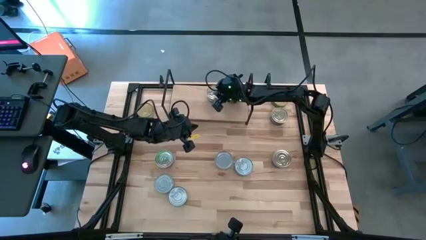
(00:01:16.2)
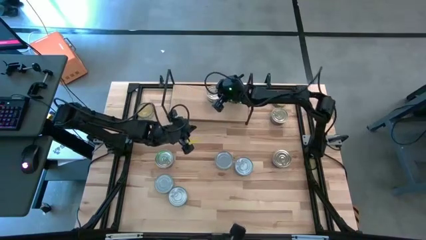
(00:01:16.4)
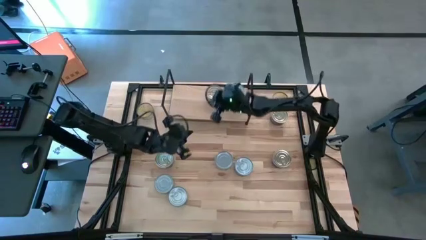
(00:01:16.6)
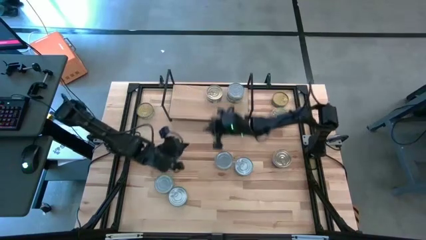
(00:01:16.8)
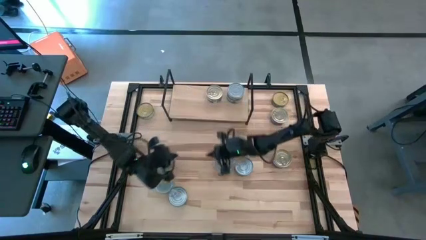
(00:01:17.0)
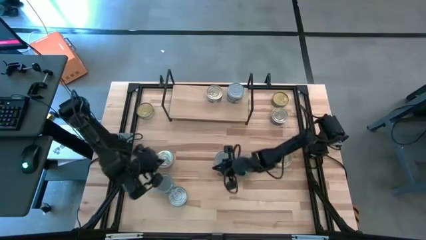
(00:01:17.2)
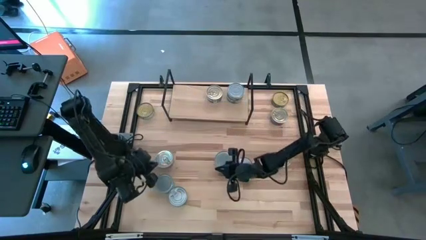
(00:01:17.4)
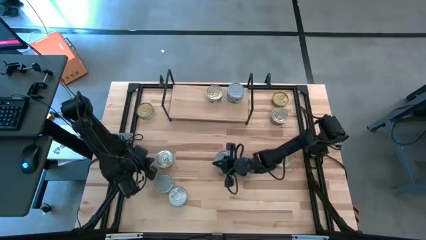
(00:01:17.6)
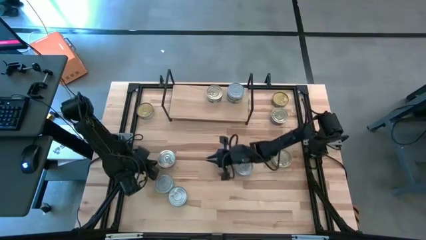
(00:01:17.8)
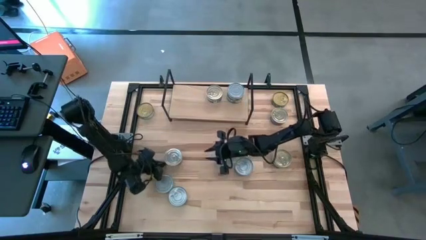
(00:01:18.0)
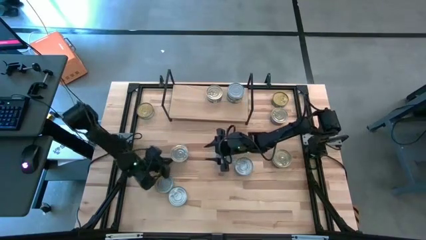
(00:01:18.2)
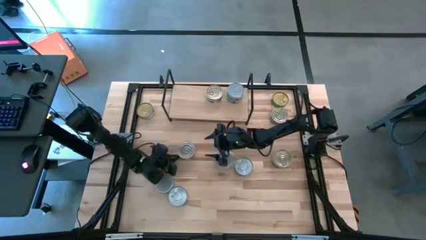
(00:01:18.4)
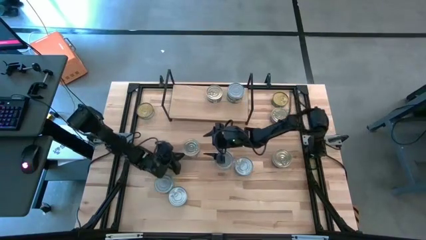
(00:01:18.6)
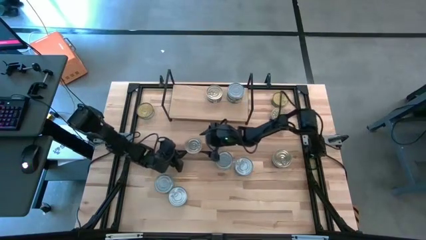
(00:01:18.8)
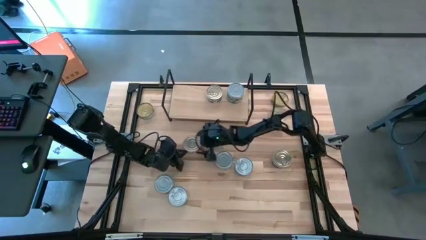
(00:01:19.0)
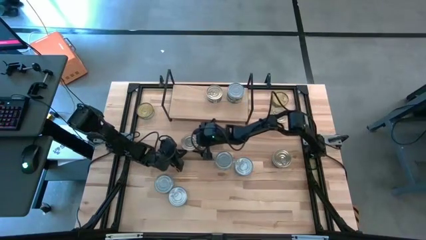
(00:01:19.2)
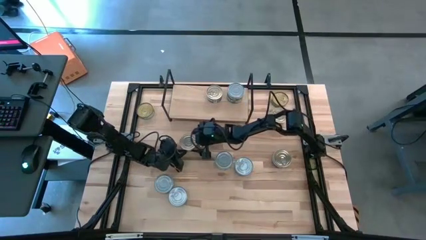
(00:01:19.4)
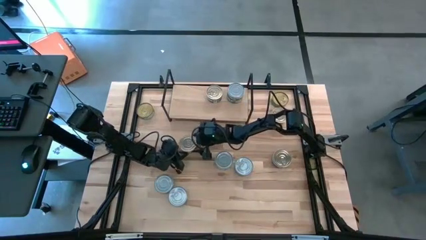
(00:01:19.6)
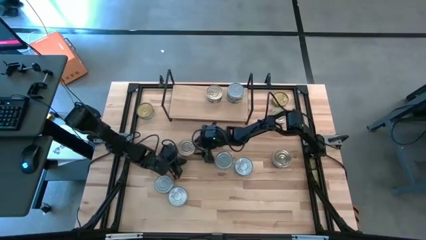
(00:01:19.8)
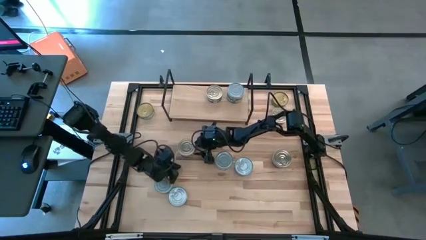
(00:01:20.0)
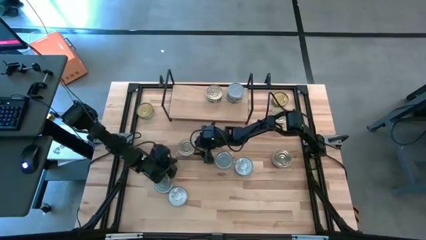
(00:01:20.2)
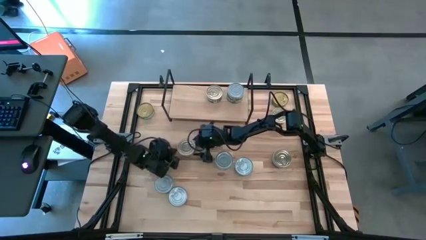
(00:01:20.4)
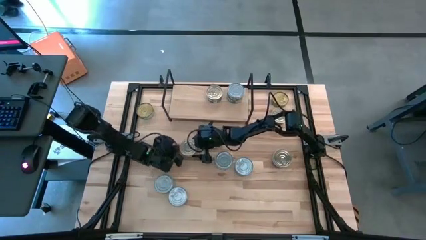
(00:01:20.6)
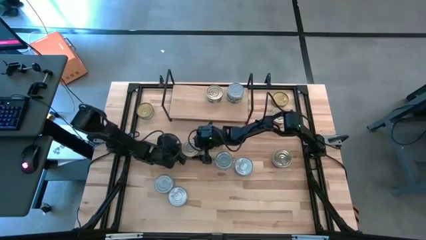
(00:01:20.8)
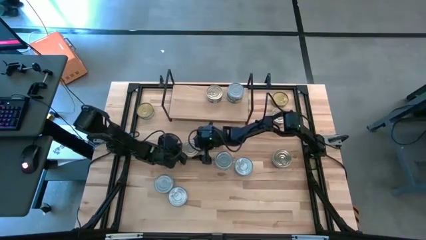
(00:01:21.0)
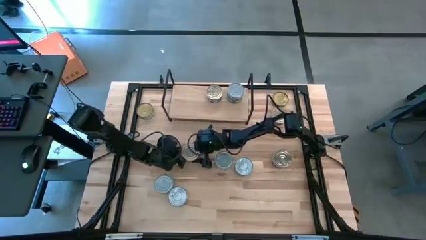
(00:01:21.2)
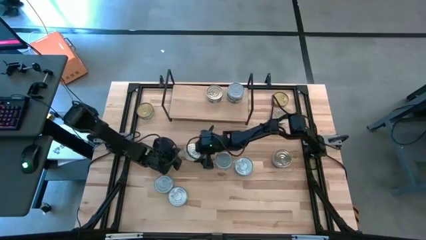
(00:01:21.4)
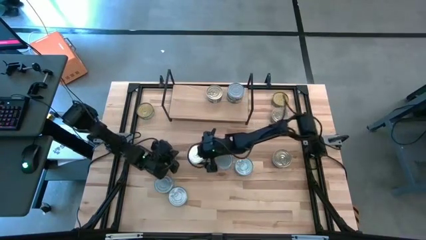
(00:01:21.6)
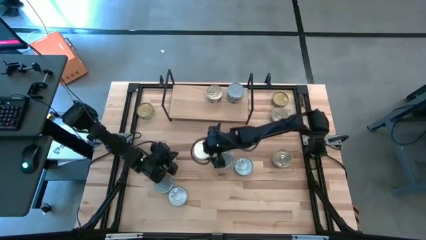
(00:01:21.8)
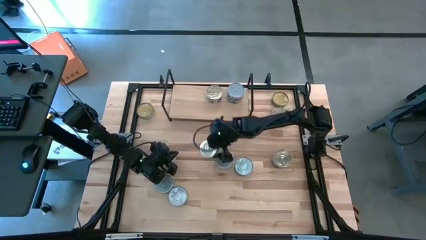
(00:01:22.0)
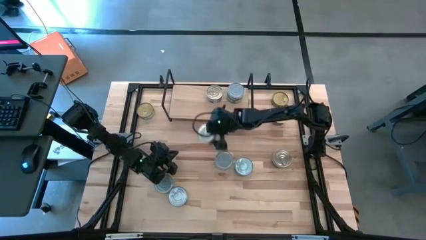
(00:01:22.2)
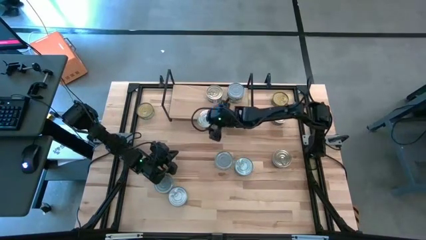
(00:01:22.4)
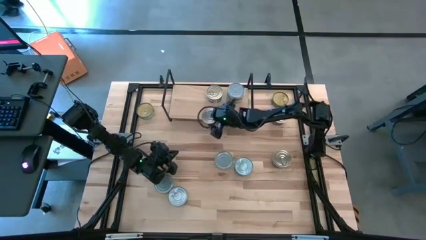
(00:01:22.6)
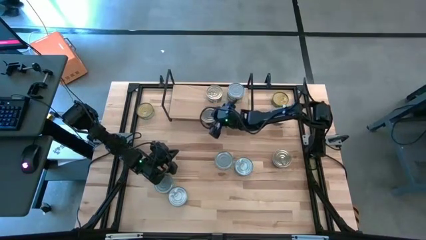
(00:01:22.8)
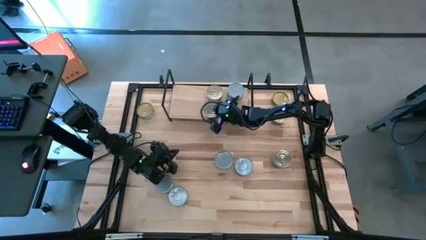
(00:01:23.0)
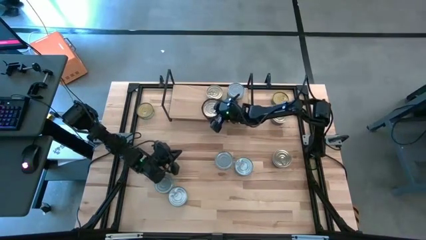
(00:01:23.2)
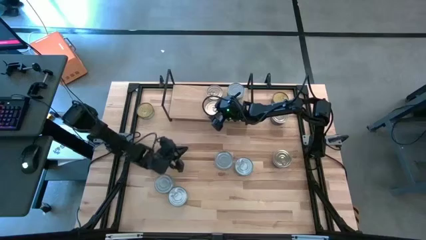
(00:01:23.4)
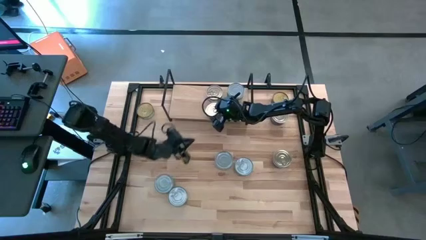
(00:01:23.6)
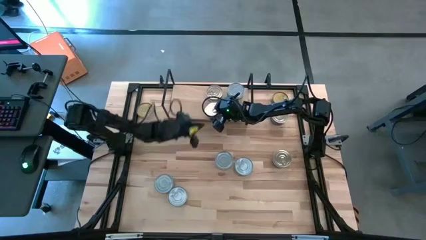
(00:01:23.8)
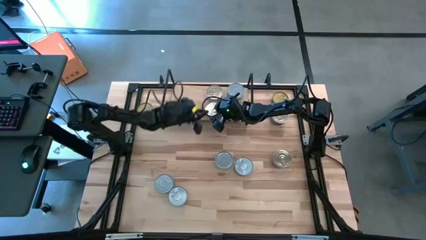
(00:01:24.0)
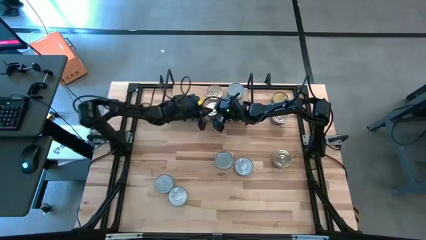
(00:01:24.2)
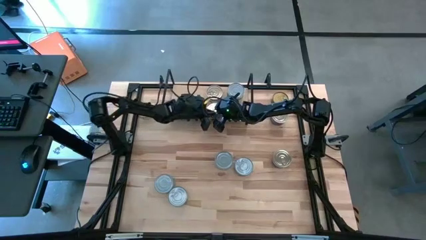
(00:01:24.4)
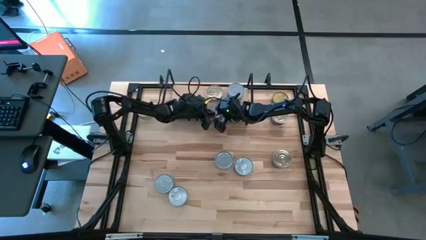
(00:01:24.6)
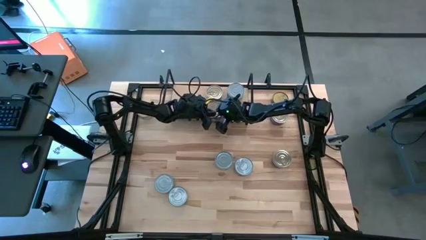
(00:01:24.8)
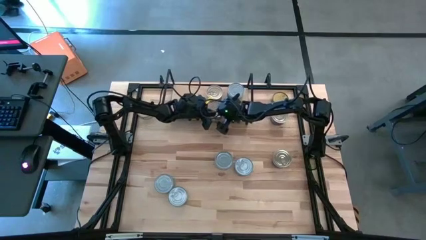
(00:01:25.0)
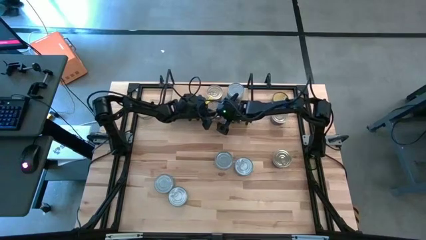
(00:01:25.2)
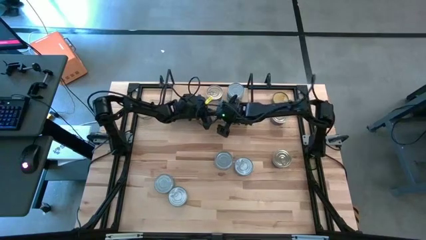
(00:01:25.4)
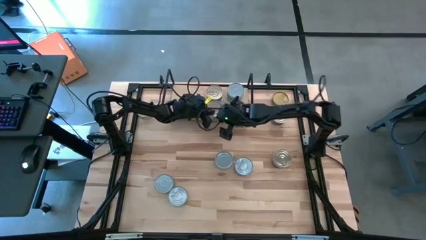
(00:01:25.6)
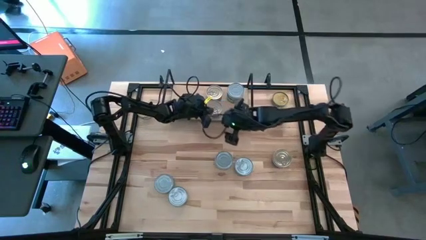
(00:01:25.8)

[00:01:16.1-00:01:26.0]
Task: Stack canned seafood by type on shelf
Put the blue-pink tuna can on the shelf
